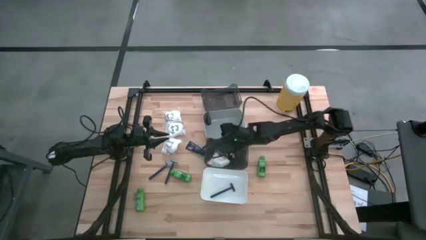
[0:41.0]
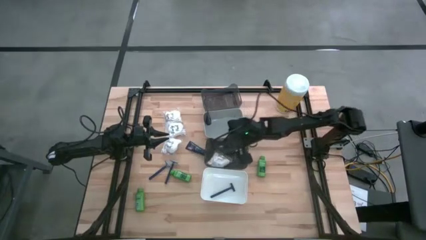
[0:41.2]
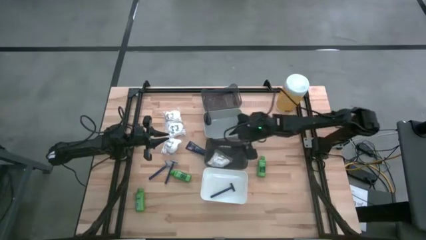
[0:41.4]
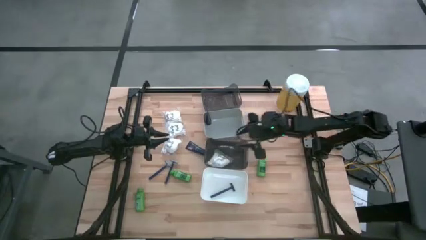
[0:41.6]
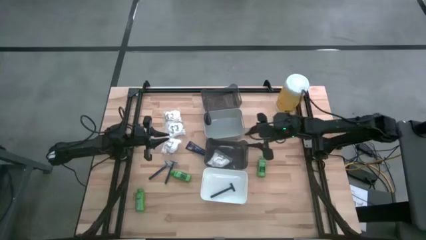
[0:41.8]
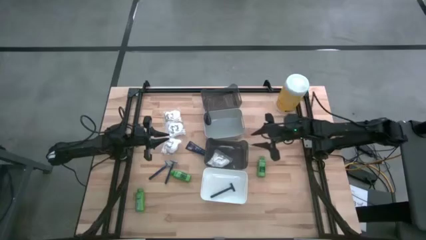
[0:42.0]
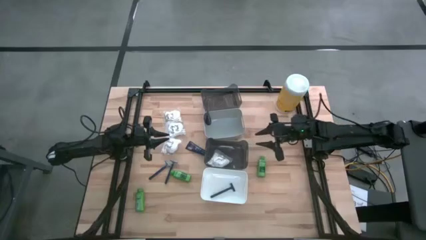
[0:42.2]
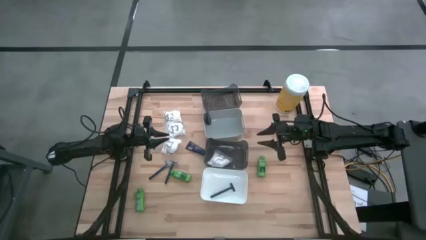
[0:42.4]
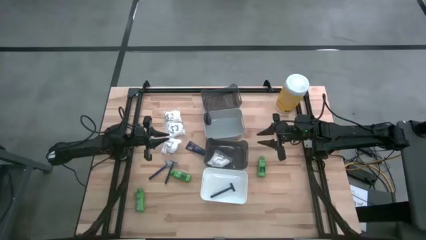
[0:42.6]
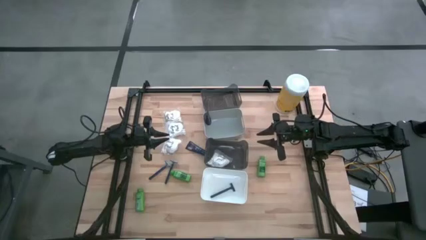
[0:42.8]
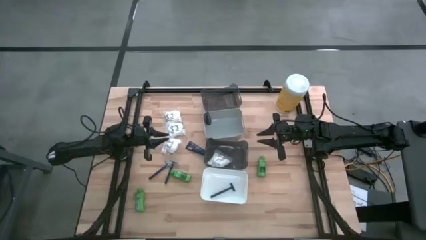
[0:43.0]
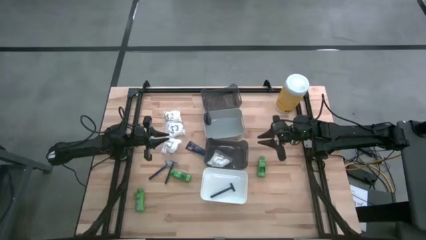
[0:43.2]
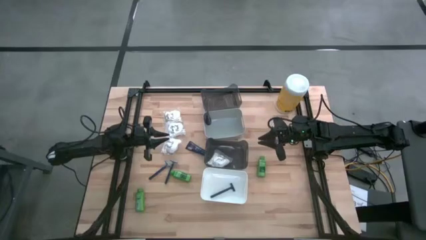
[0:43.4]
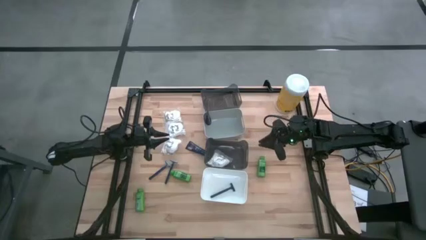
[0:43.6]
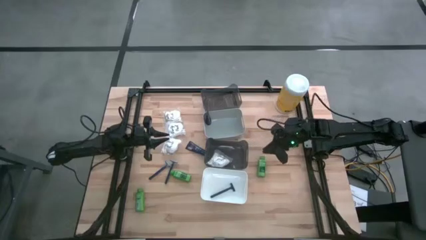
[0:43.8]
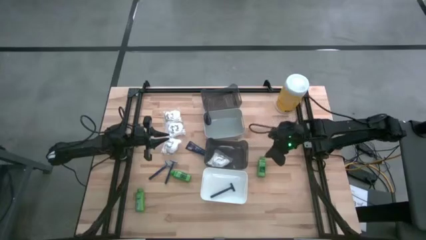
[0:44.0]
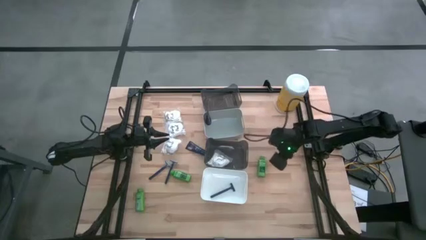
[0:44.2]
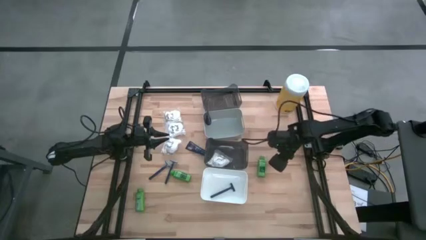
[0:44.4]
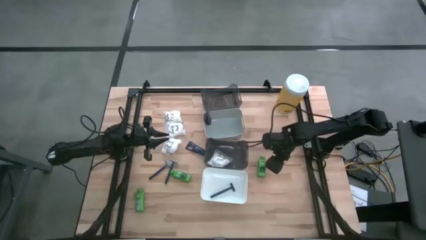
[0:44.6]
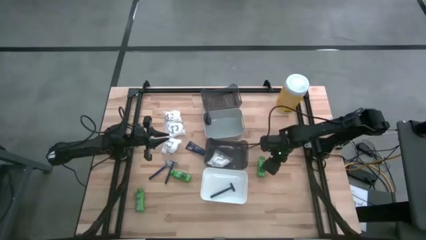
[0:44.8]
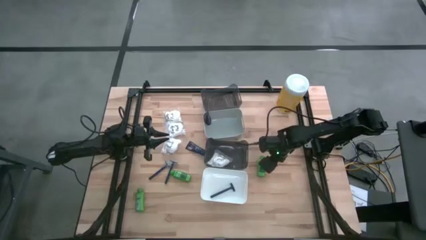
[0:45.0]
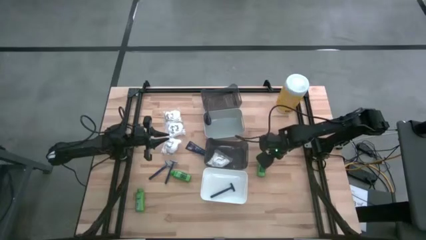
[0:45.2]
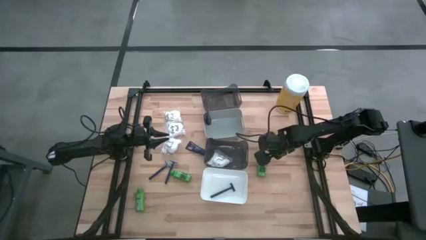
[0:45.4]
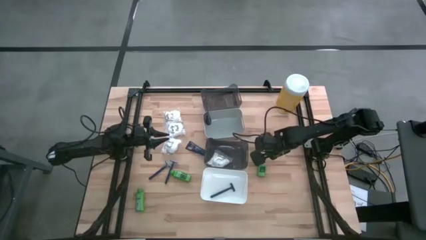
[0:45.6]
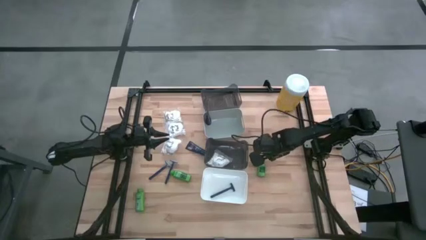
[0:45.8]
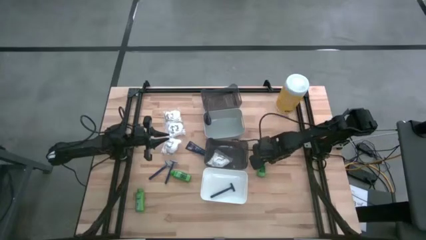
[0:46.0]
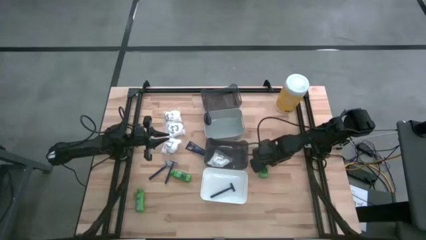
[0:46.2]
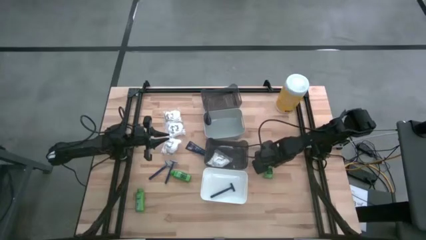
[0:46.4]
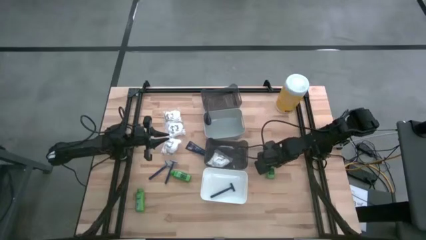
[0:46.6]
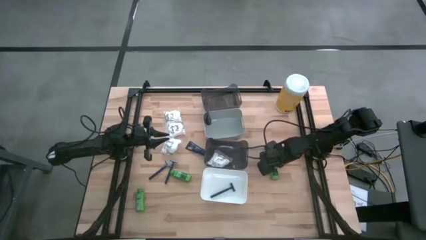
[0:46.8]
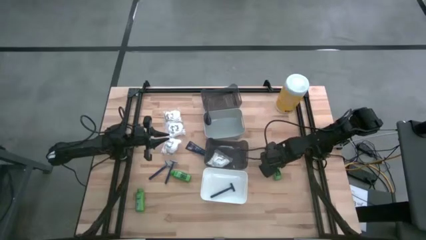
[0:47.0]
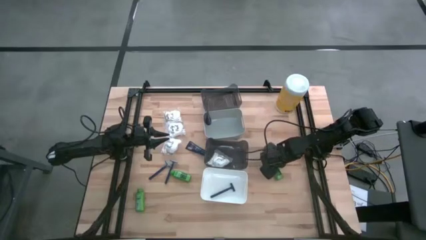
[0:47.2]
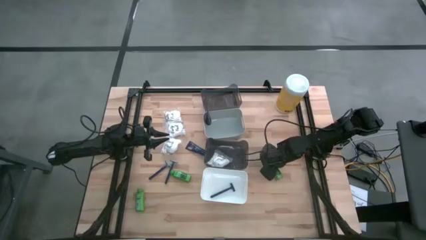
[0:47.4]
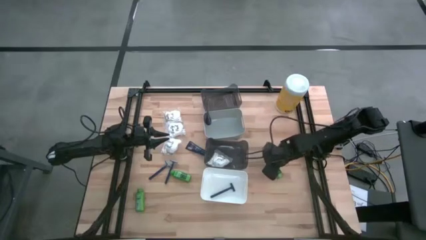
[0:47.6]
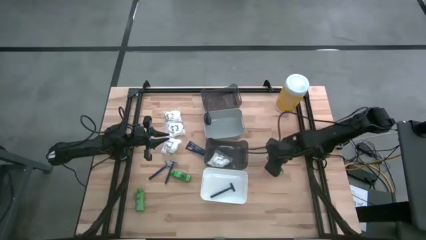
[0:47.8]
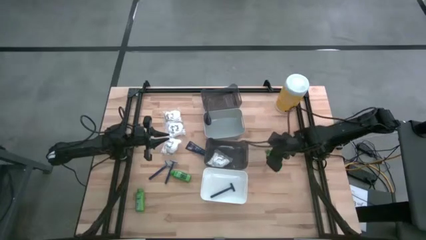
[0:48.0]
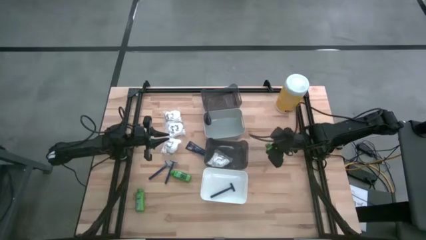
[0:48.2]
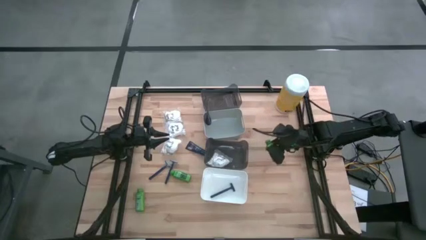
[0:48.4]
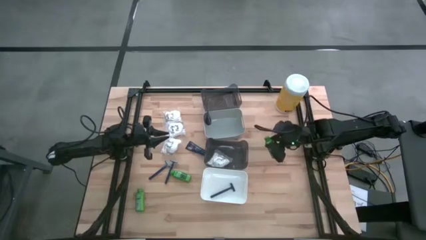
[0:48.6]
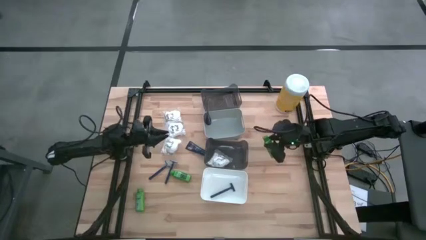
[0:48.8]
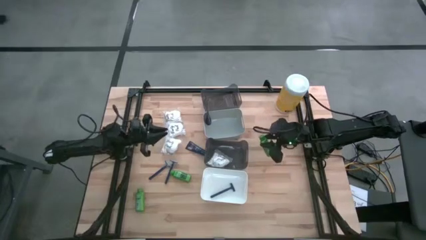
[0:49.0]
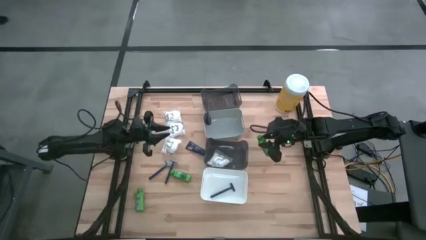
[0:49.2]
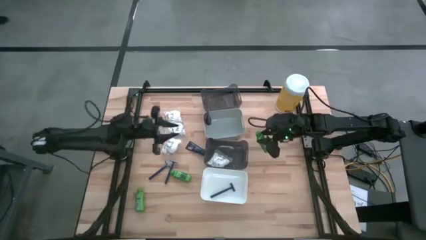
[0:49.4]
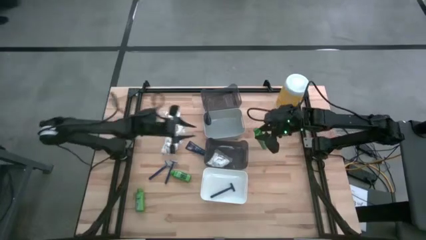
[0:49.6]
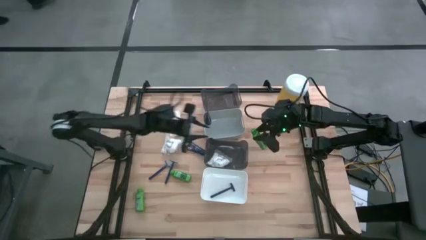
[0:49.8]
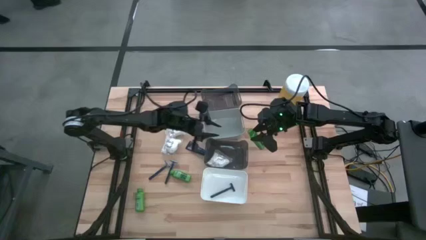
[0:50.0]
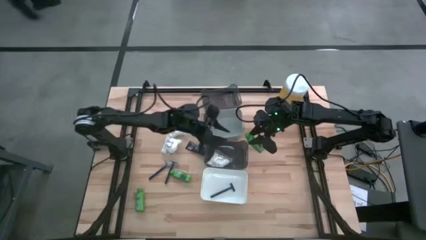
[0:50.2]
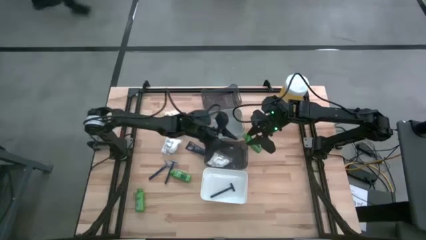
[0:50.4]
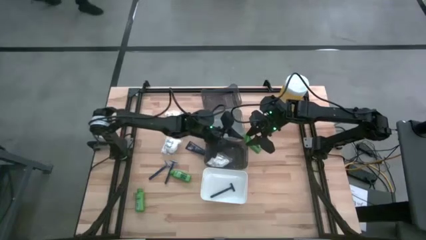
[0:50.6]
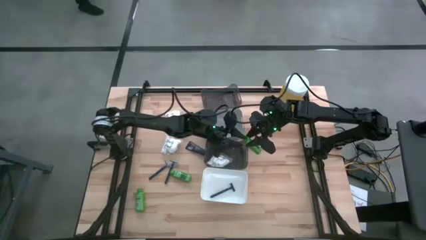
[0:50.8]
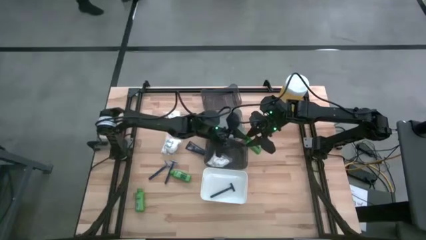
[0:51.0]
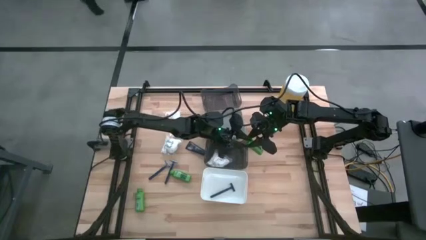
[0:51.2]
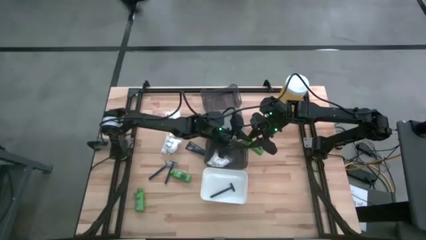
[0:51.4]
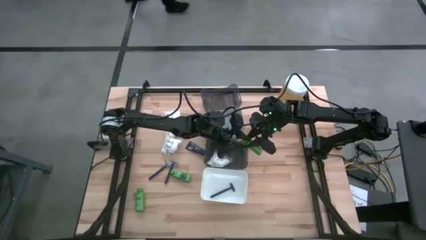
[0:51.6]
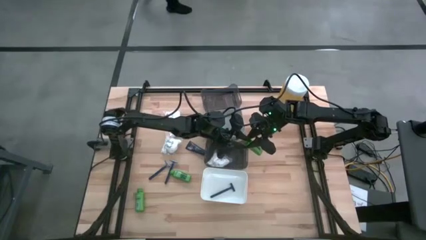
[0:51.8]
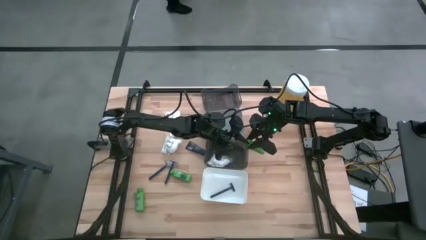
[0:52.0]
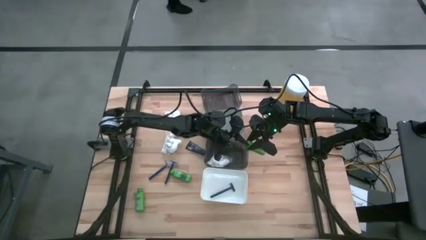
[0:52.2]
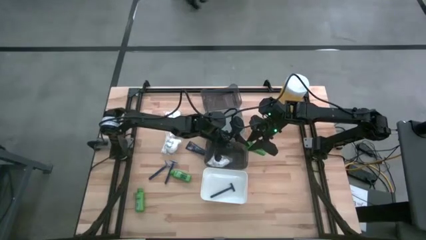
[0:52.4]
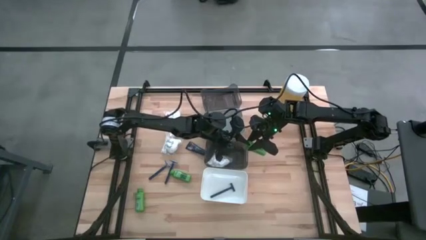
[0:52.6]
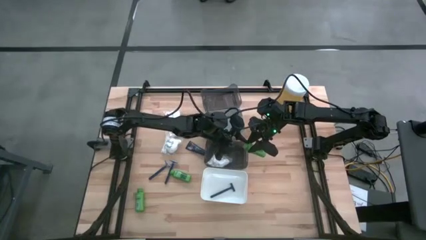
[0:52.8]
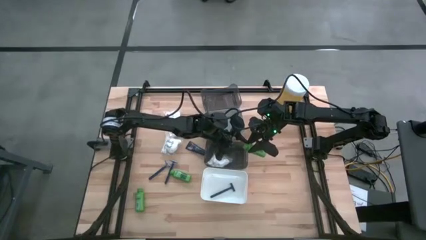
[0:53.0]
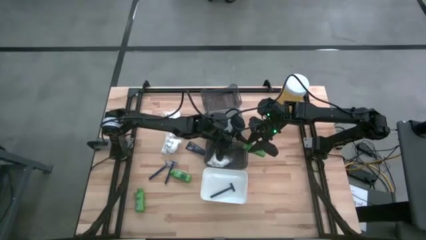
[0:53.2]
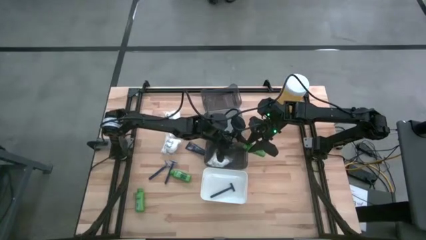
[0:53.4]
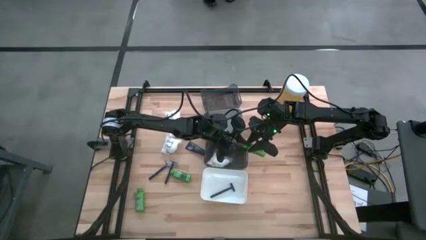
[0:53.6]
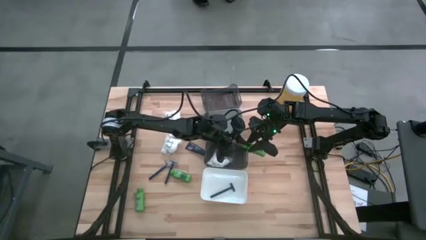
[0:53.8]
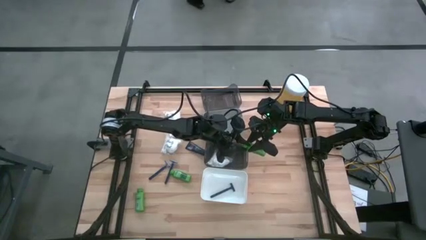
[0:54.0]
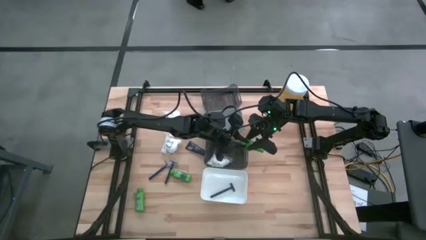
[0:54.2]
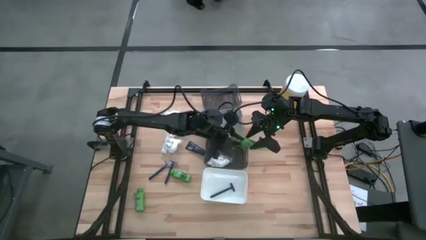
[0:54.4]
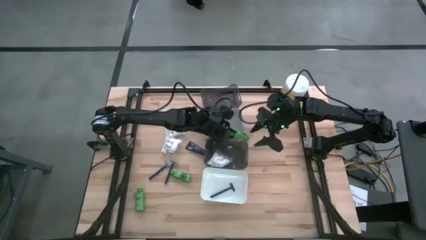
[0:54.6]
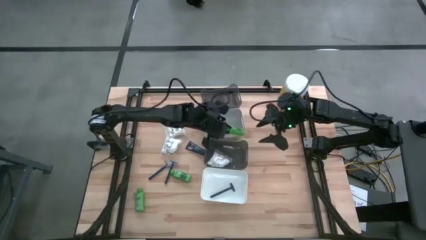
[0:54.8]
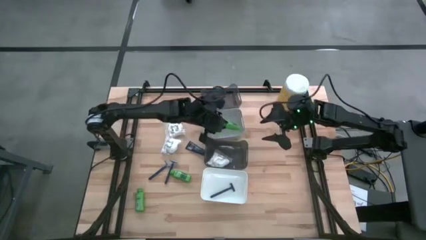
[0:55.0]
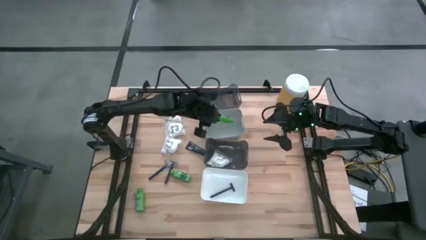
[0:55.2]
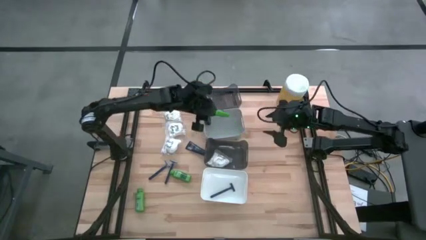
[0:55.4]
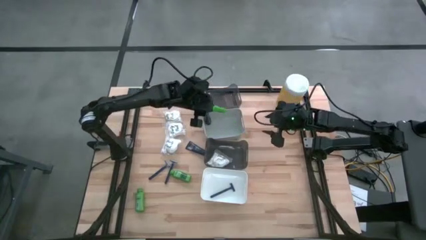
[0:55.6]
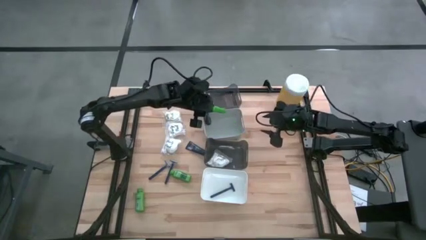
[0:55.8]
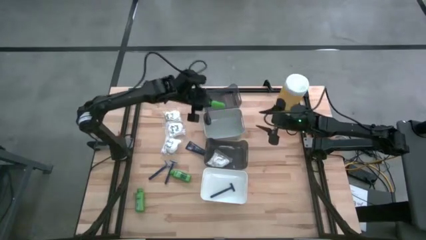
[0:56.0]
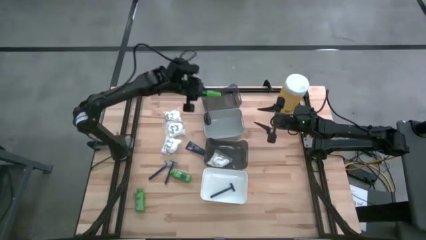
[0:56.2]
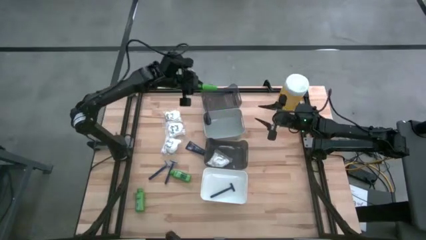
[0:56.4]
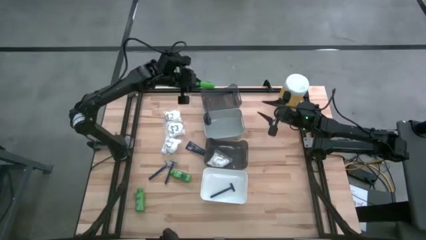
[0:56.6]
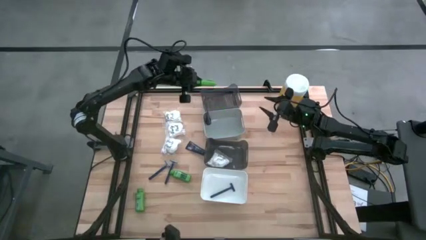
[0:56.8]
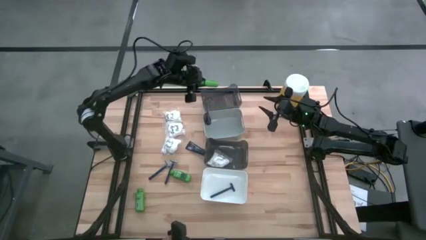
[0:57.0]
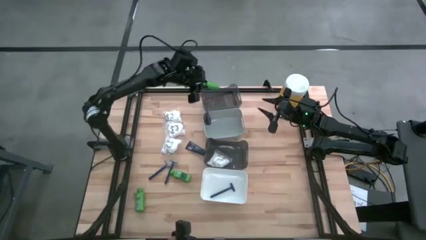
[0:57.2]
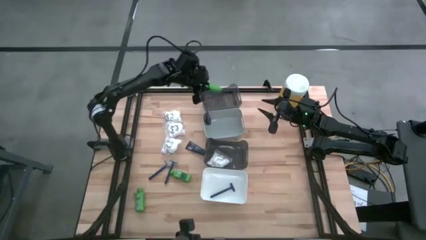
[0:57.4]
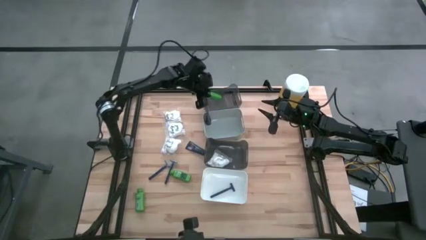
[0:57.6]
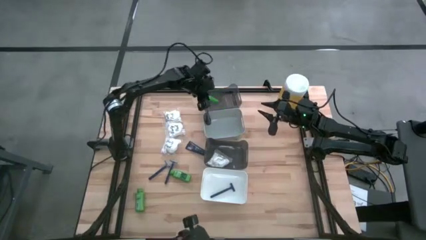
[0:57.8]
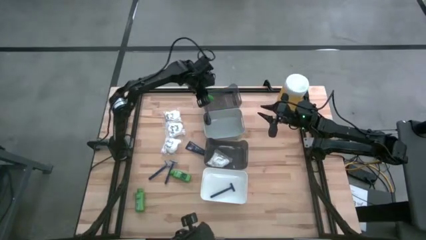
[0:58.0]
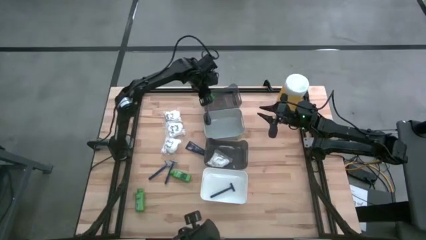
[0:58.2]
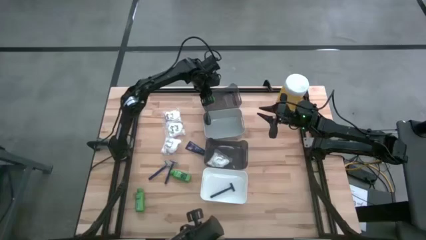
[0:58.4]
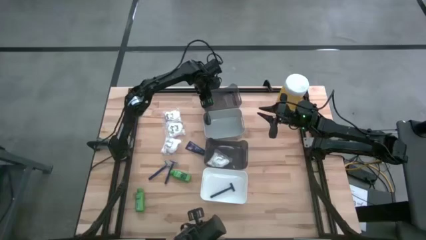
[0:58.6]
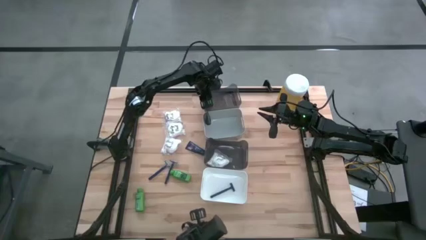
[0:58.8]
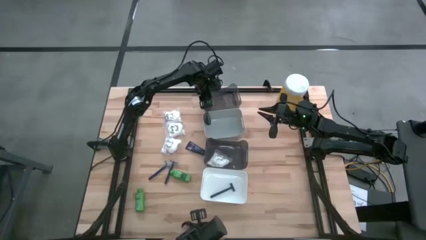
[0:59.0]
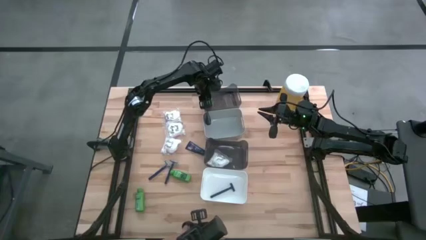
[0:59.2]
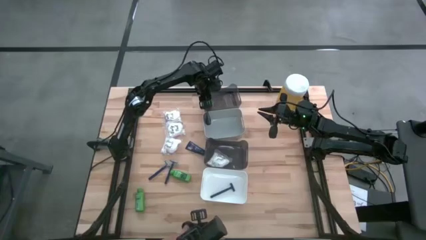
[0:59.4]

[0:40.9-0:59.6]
Task: Pick & Place Travel size toiletries
Put the right green shampoo into the top black bin
